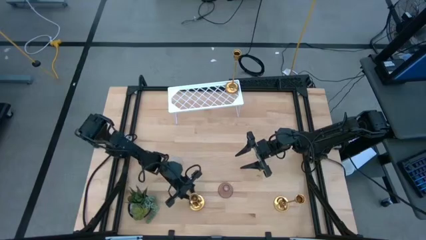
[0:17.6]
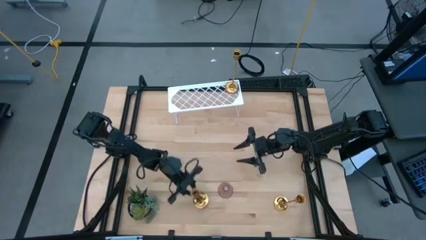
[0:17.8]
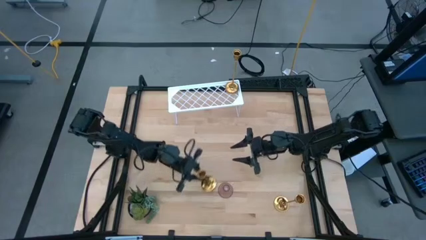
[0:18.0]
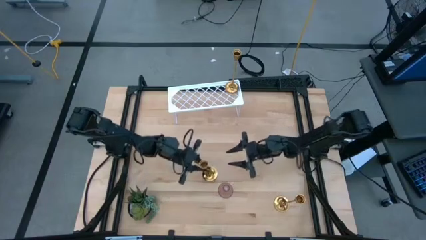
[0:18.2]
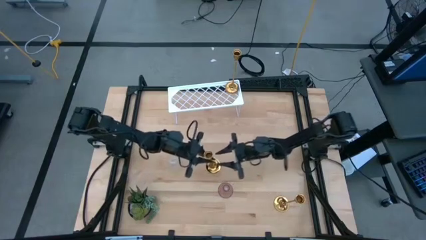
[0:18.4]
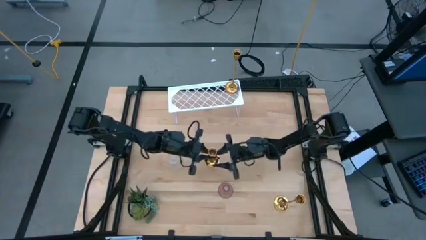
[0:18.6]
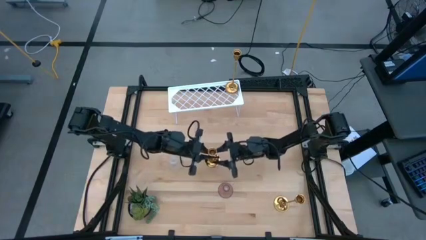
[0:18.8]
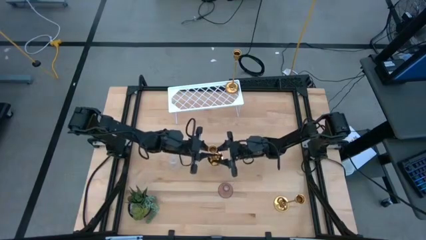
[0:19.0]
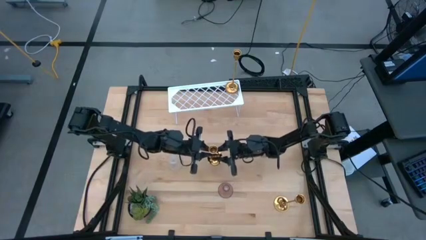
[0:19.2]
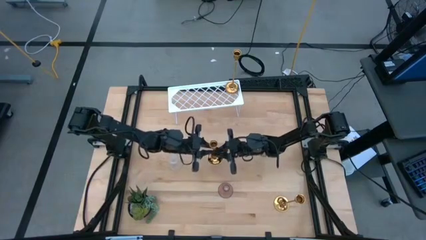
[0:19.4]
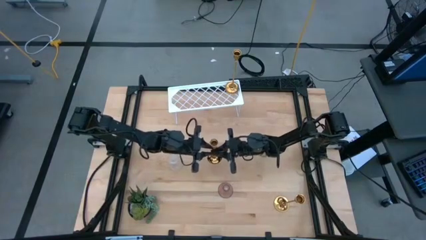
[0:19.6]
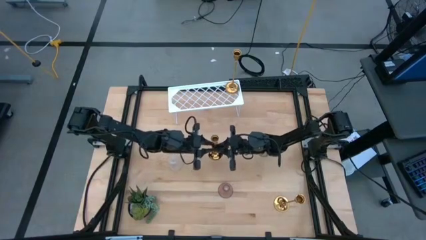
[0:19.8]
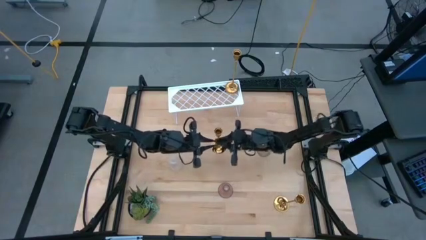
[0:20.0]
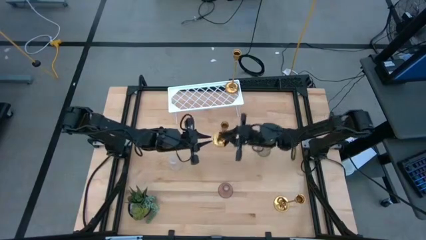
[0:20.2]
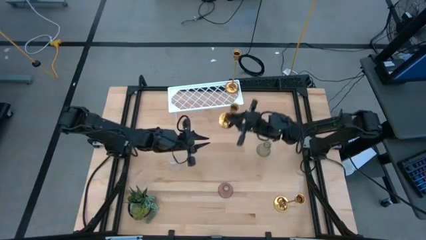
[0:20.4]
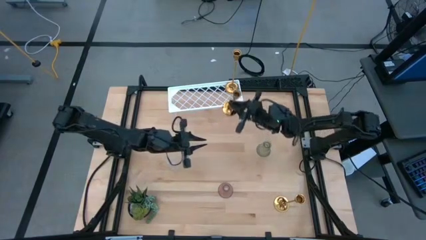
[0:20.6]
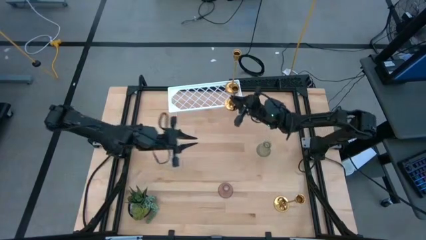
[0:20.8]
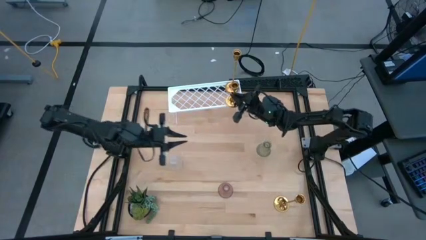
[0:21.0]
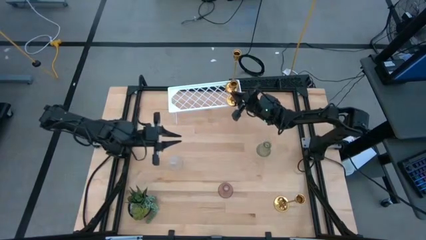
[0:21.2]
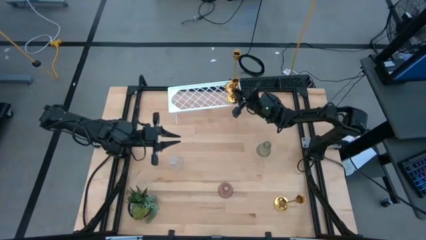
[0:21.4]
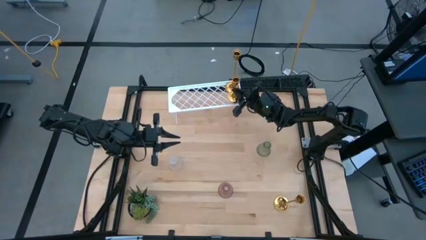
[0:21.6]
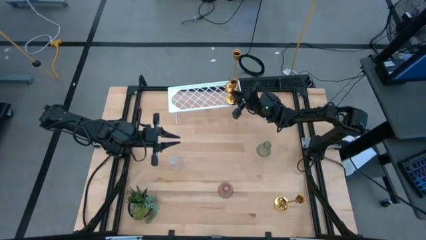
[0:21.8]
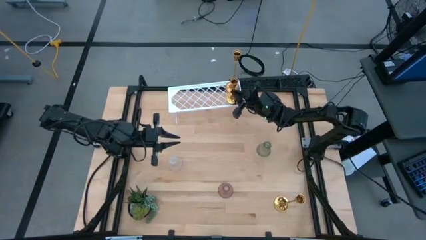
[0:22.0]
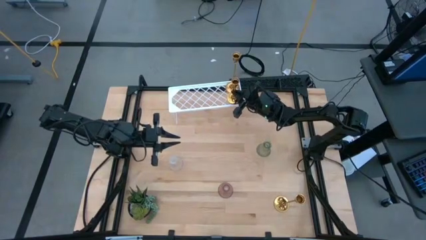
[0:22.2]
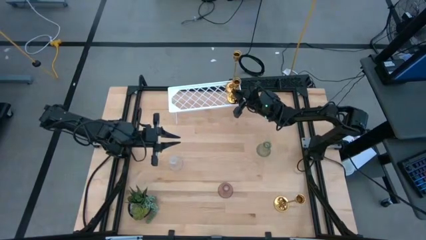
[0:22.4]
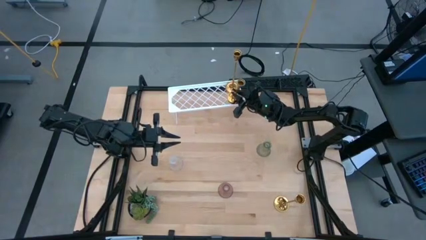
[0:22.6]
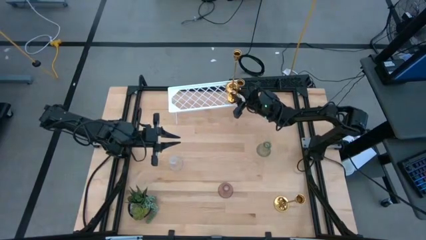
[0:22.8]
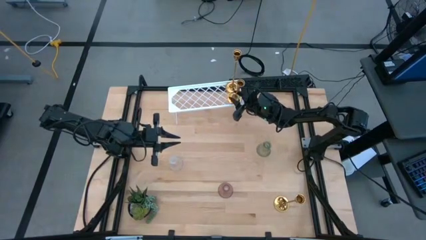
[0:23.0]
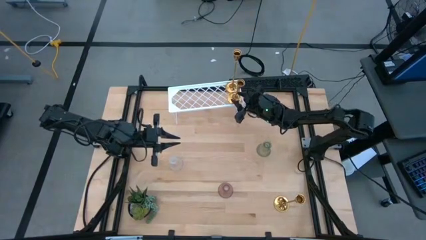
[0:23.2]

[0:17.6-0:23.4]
Task: Pick & Place candle stick holders
Put the left golden candle holder on the shelf aligned with the other golden candle holder

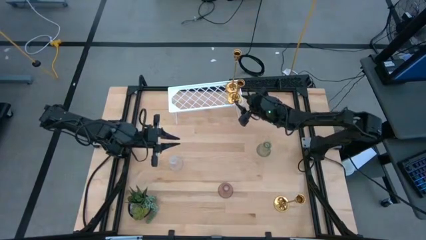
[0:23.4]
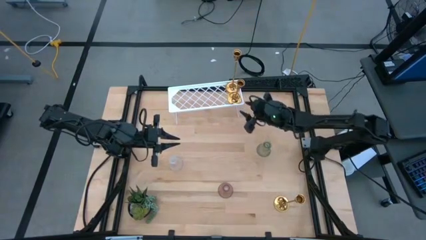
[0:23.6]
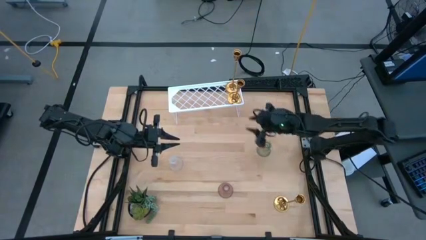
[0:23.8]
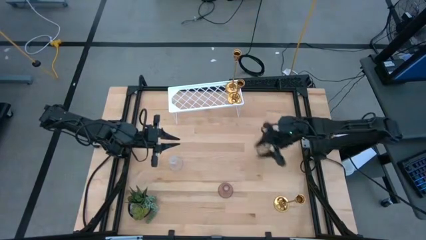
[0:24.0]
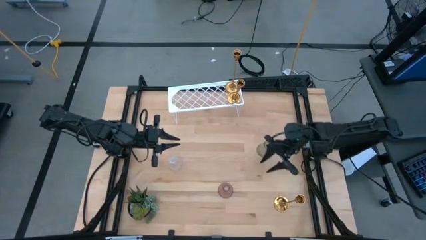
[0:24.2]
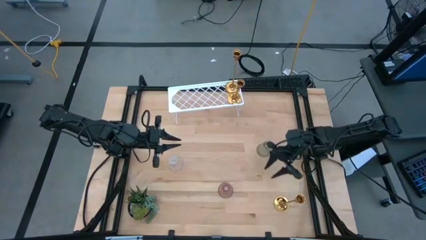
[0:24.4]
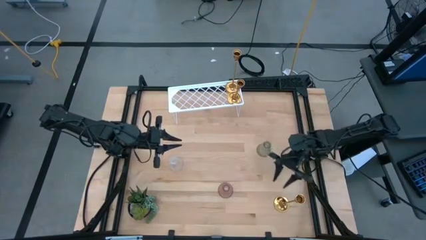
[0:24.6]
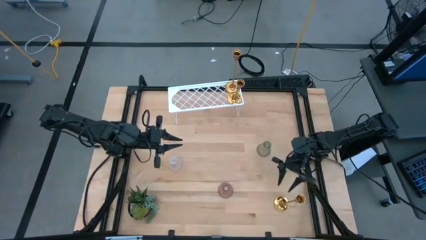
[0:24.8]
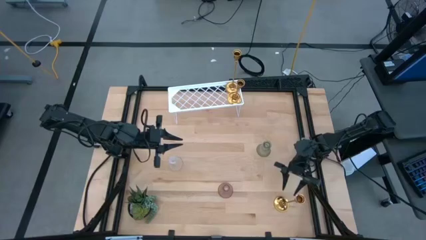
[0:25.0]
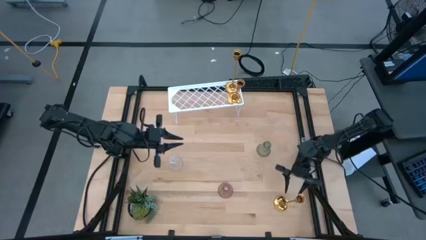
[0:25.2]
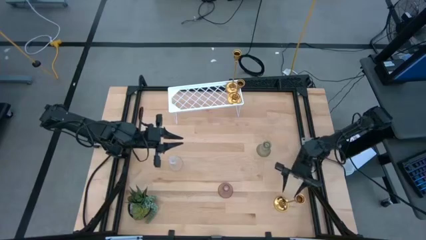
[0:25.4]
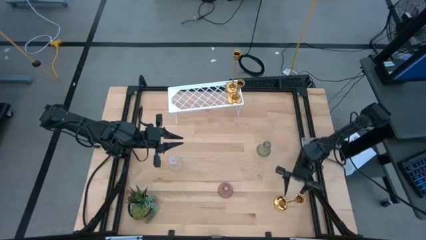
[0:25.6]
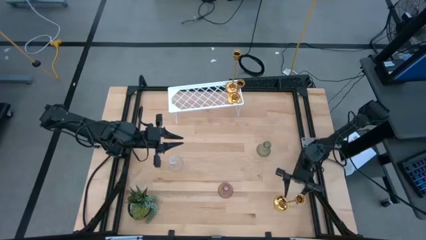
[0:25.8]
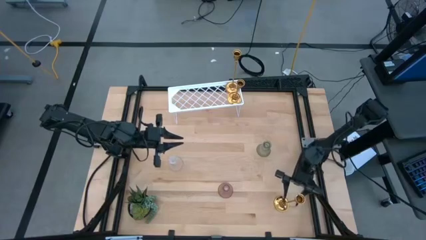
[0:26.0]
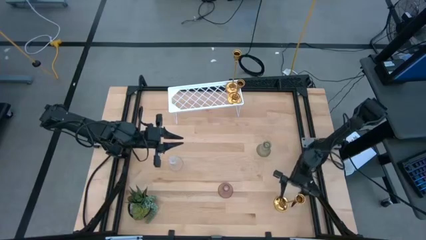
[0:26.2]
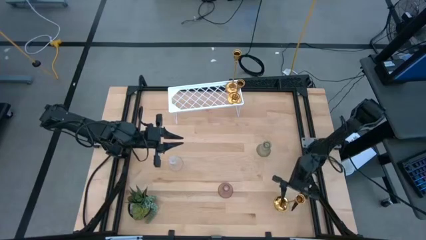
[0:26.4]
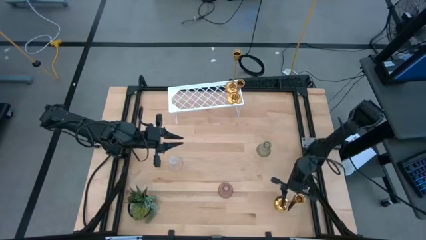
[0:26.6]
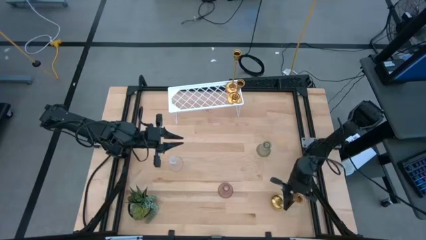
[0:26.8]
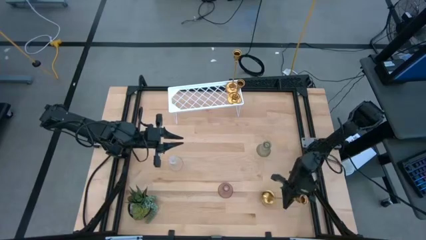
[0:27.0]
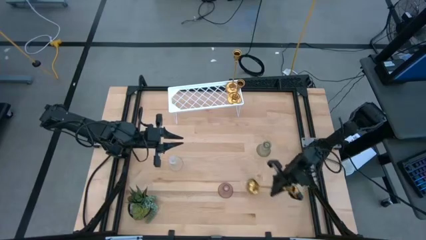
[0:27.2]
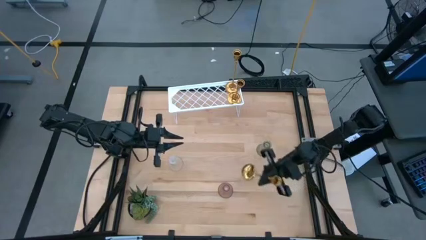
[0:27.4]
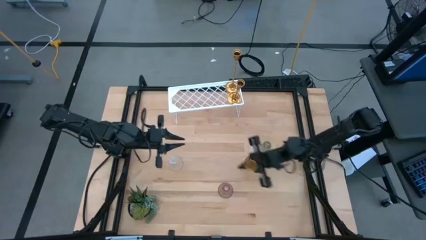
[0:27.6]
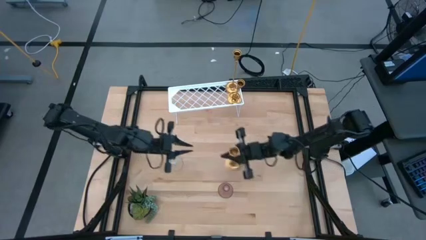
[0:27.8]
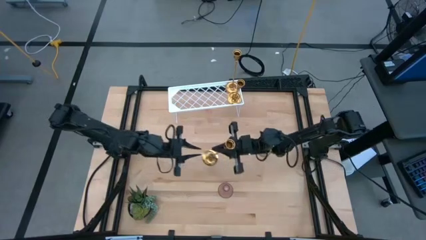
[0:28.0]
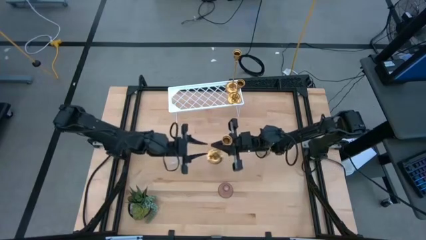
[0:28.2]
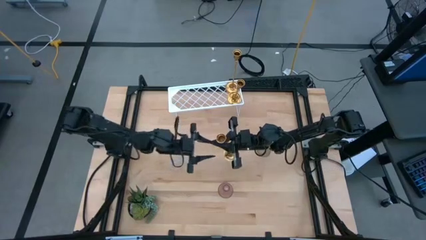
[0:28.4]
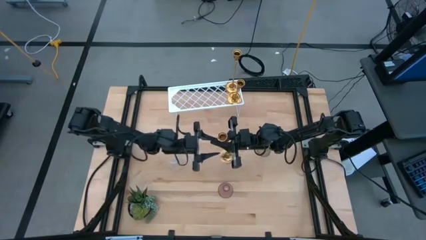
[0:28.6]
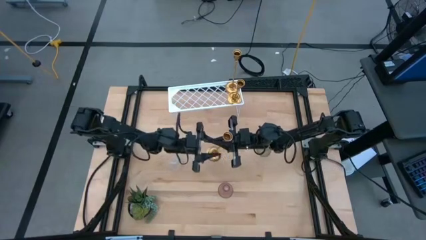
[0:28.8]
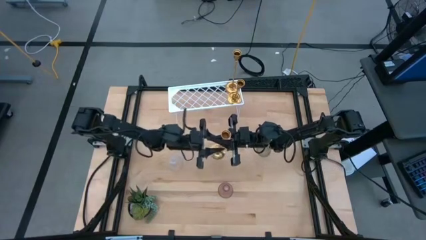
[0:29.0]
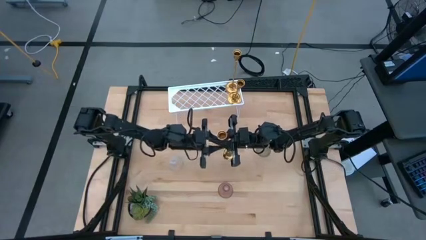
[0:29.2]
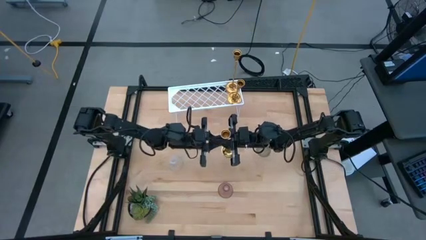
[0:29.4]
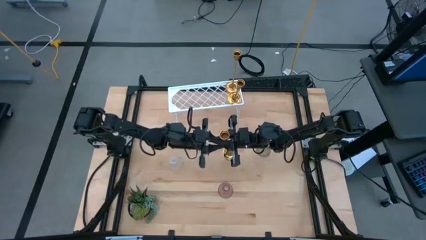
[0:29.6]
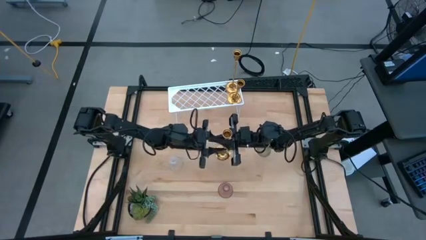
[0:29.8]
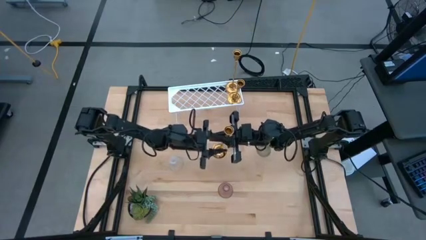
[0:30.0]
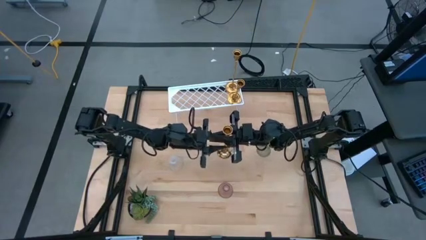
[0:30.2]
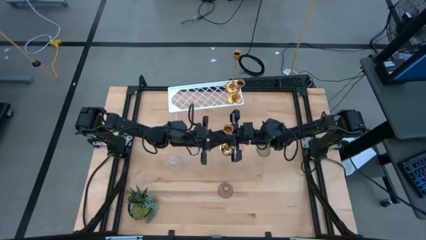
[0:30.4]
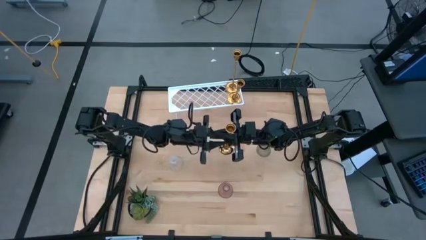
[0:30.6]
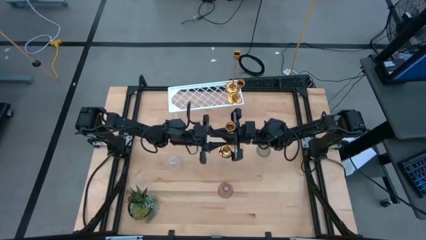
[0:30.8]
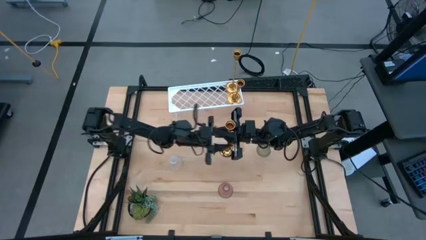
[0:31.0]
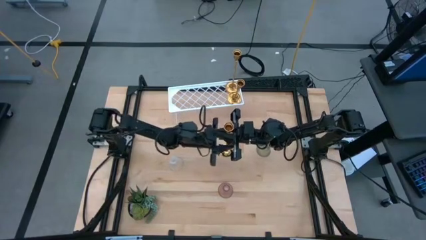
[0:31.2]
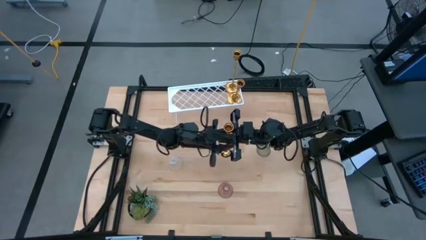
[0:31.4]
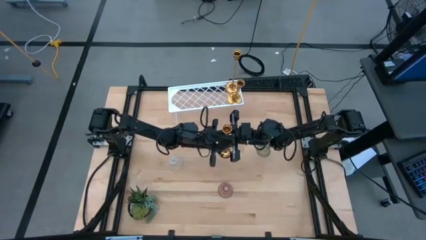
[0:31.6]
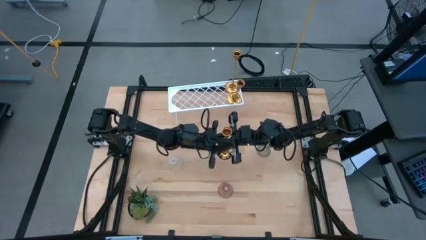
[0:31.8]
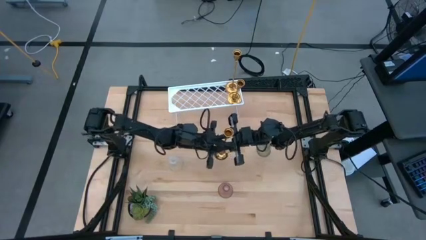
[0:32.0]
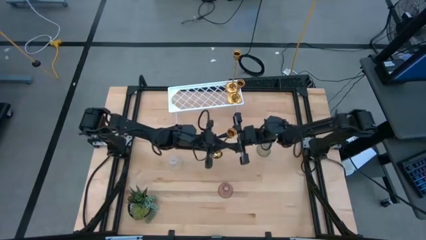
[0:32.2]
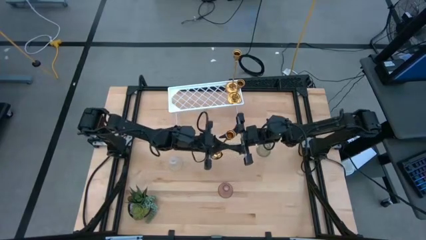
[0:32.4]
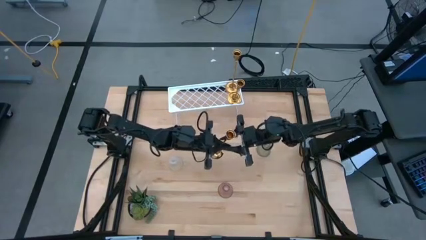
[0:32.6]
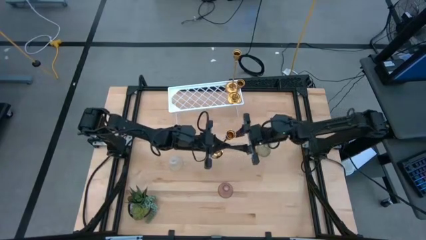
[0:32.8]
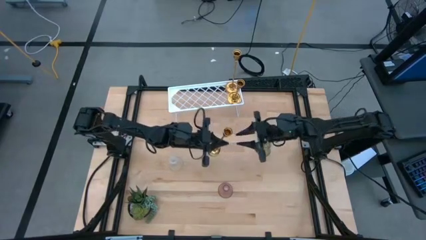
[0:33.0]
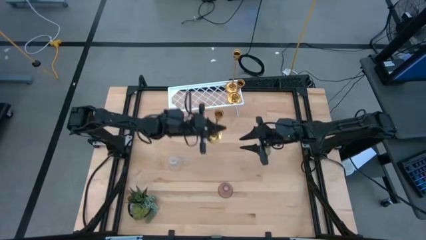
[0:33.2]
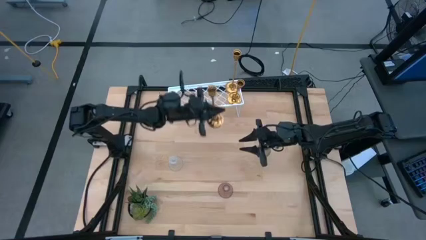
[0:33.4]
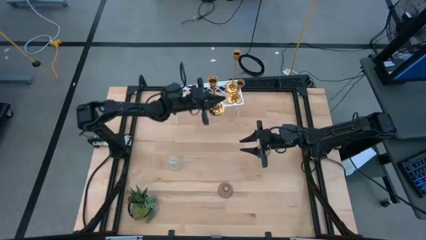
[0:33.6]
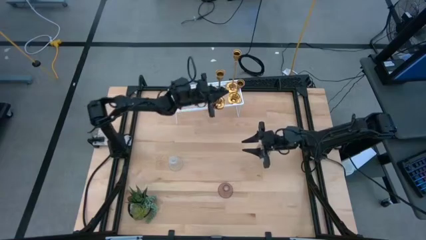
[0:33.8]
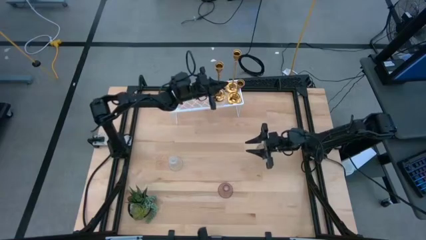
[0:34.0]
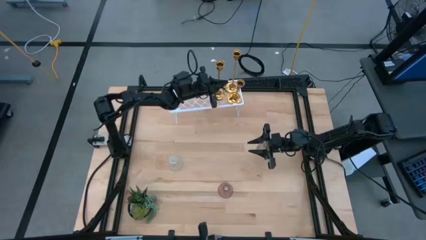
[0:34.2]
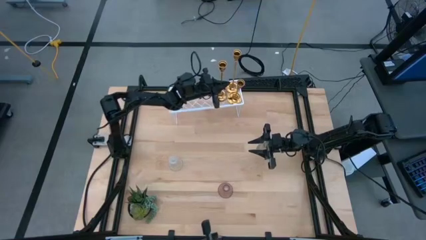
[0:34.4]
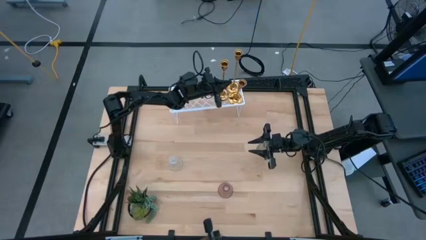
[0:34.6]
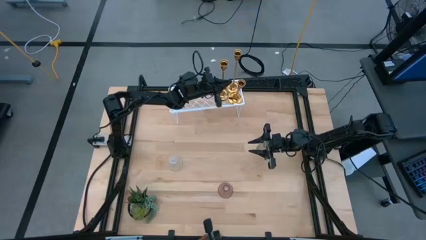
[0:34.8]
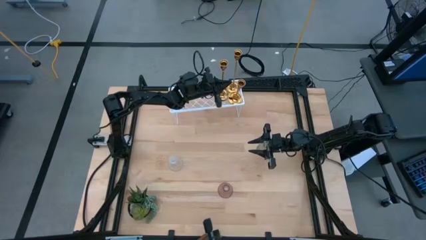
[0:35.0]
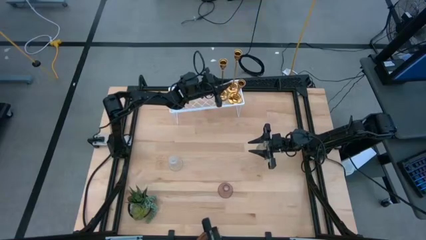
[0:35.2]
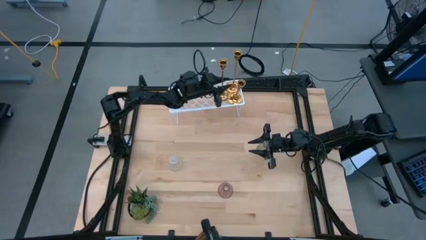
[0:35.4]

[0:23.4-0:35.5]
Put the golden candle holder on the shelf
